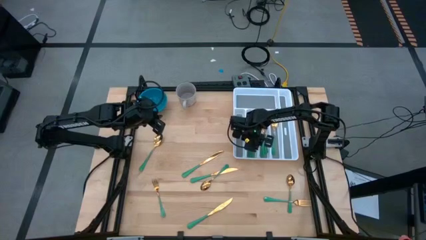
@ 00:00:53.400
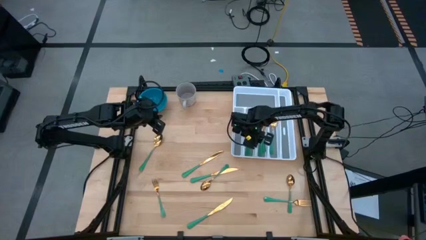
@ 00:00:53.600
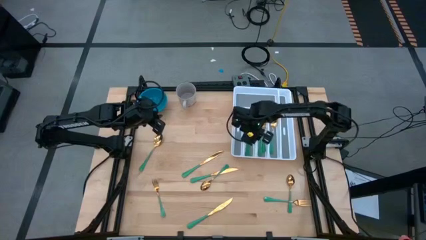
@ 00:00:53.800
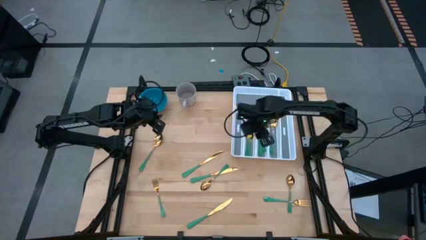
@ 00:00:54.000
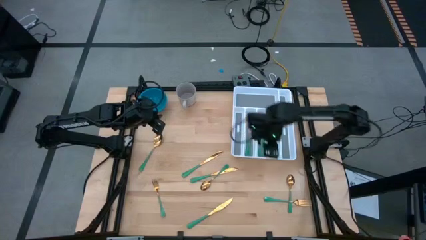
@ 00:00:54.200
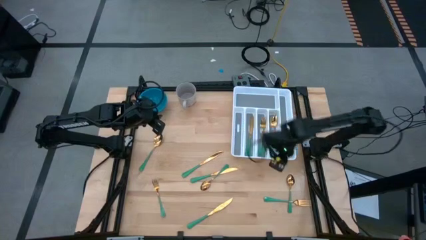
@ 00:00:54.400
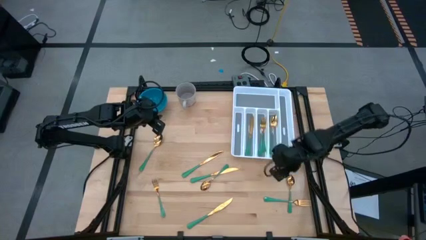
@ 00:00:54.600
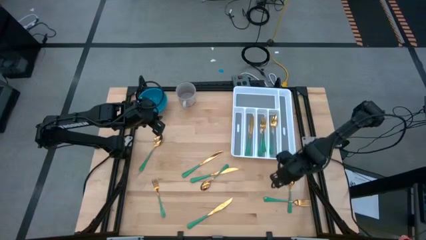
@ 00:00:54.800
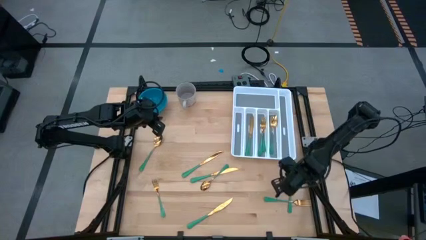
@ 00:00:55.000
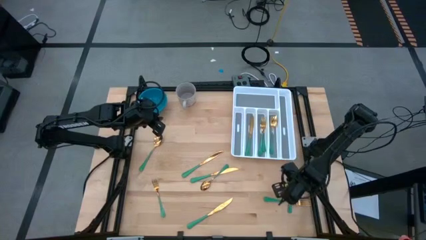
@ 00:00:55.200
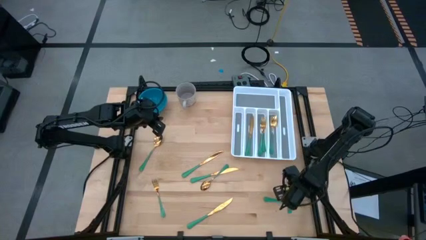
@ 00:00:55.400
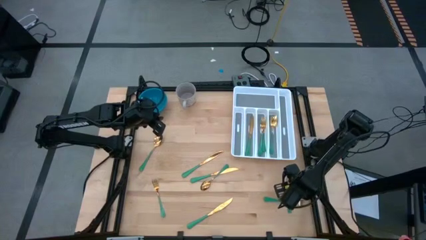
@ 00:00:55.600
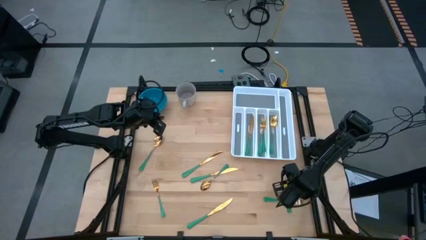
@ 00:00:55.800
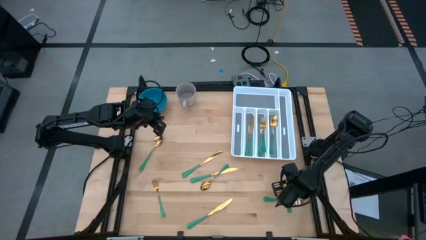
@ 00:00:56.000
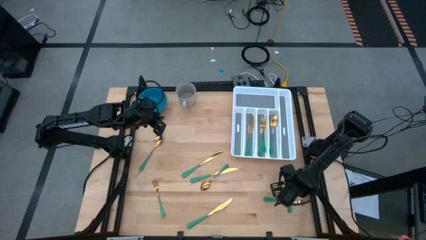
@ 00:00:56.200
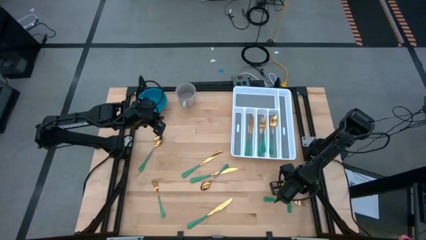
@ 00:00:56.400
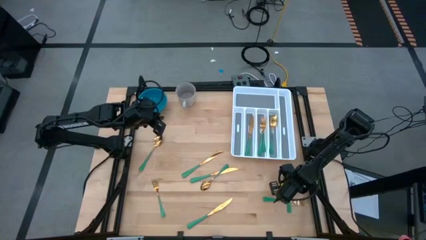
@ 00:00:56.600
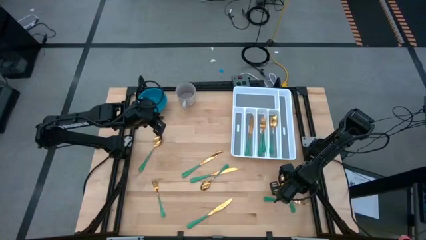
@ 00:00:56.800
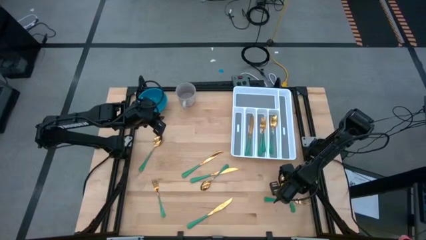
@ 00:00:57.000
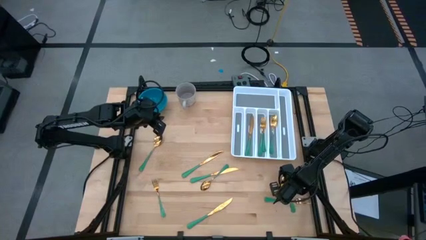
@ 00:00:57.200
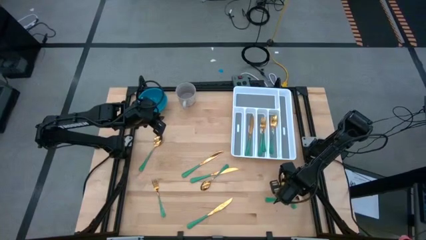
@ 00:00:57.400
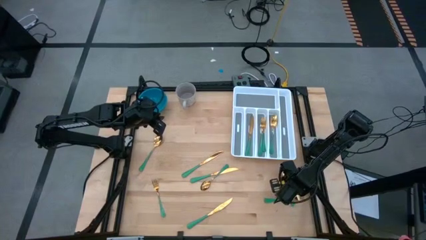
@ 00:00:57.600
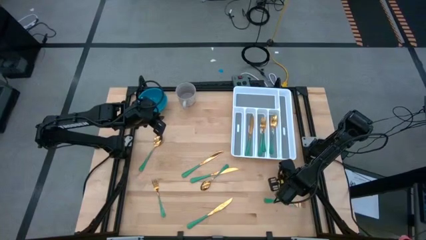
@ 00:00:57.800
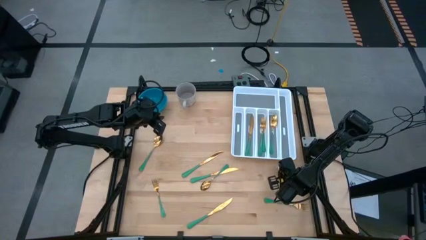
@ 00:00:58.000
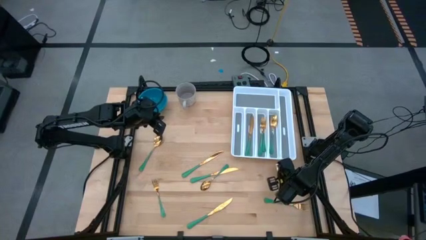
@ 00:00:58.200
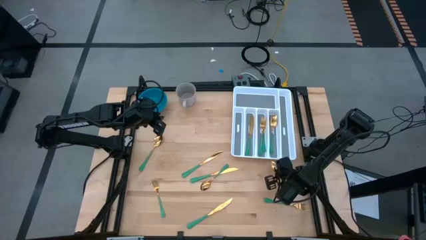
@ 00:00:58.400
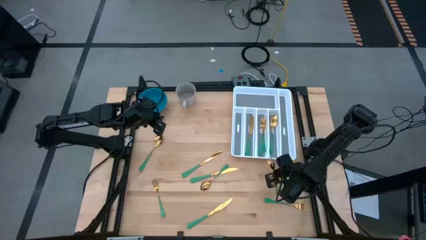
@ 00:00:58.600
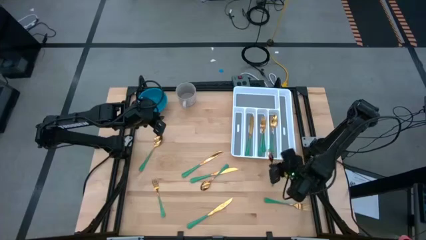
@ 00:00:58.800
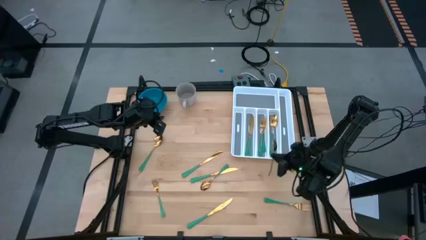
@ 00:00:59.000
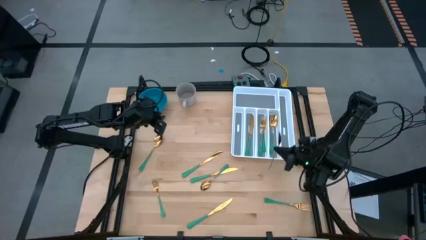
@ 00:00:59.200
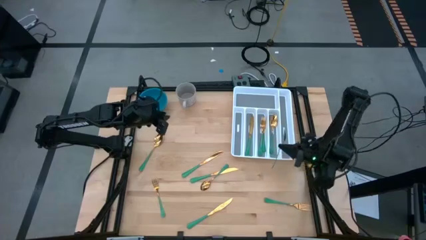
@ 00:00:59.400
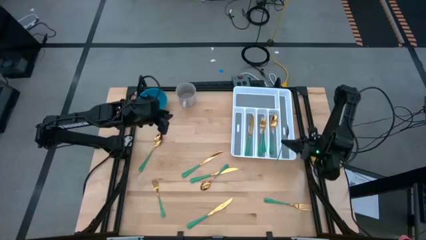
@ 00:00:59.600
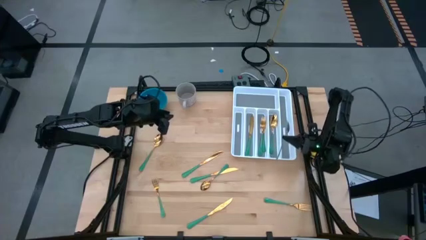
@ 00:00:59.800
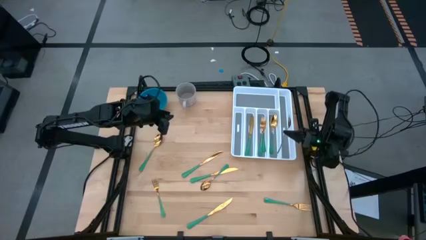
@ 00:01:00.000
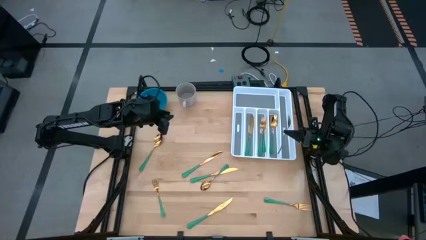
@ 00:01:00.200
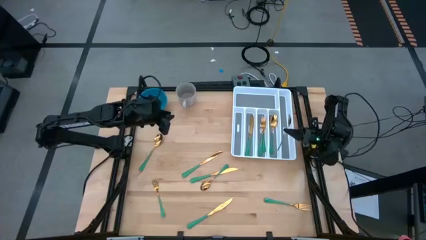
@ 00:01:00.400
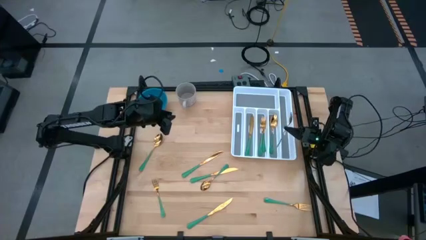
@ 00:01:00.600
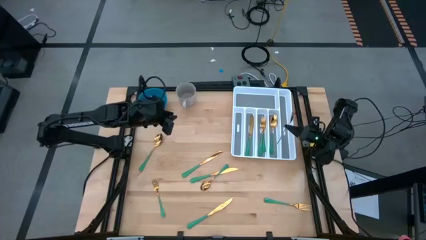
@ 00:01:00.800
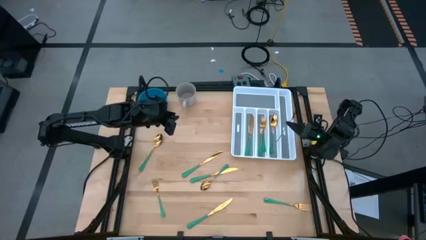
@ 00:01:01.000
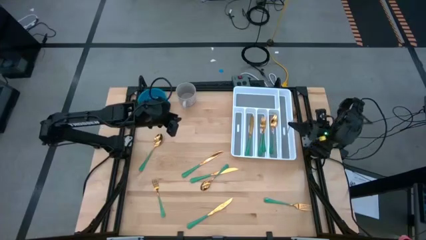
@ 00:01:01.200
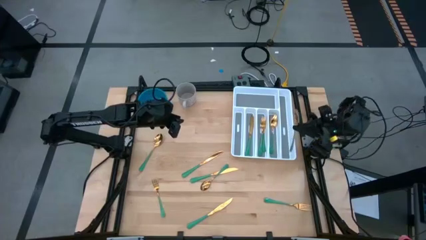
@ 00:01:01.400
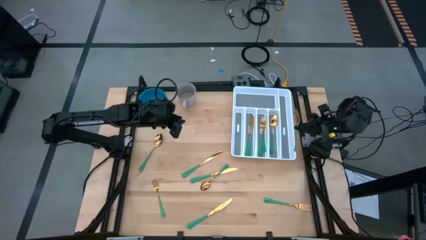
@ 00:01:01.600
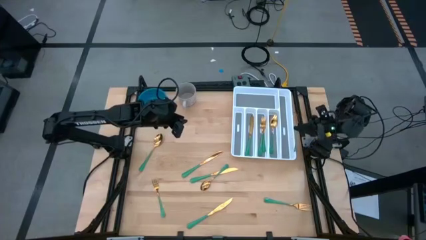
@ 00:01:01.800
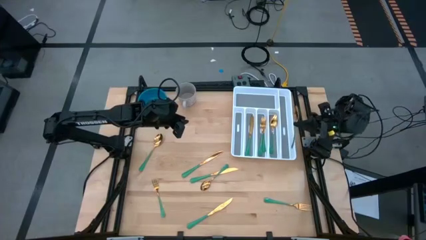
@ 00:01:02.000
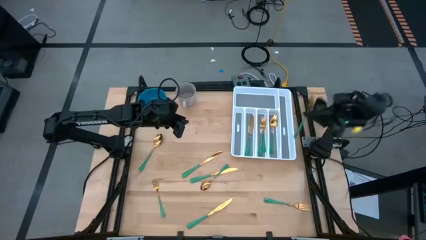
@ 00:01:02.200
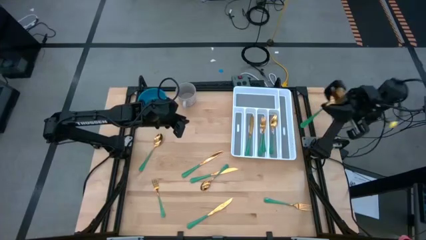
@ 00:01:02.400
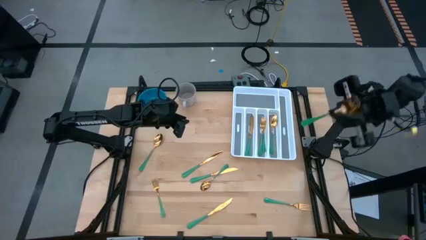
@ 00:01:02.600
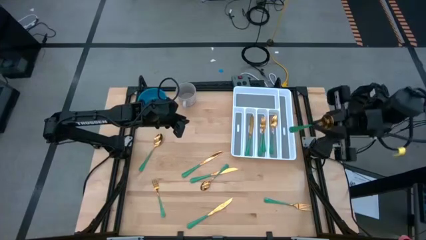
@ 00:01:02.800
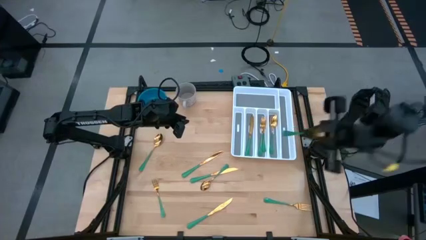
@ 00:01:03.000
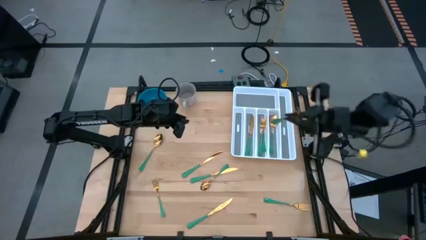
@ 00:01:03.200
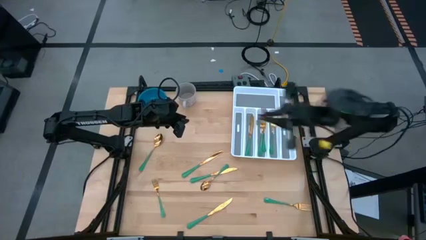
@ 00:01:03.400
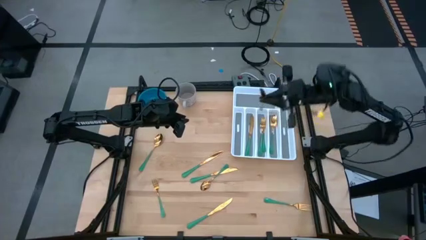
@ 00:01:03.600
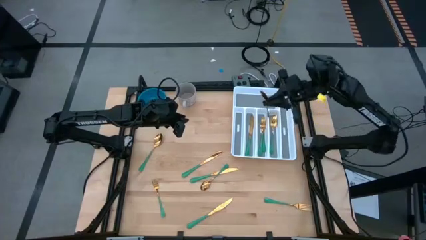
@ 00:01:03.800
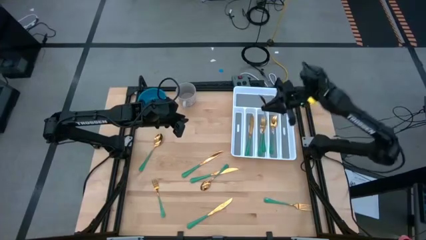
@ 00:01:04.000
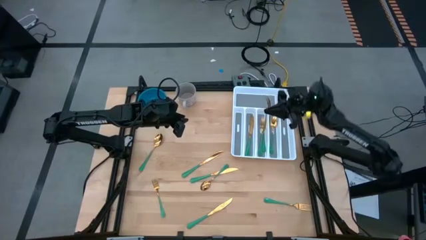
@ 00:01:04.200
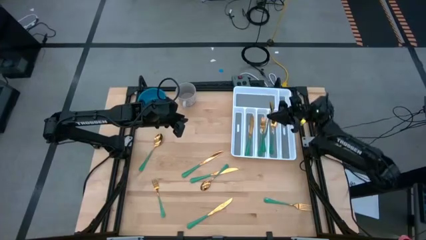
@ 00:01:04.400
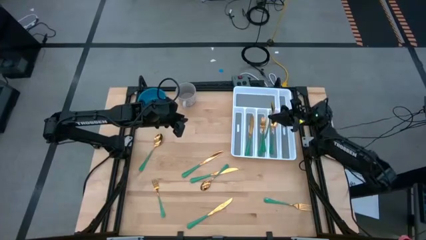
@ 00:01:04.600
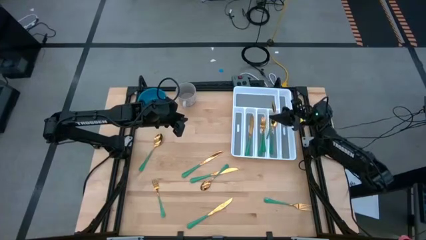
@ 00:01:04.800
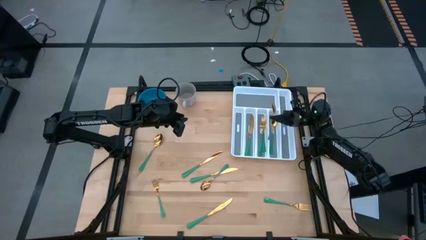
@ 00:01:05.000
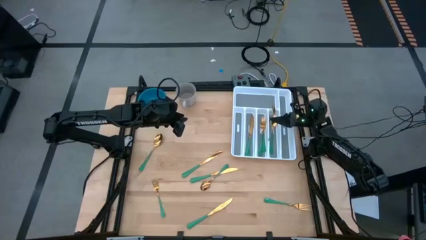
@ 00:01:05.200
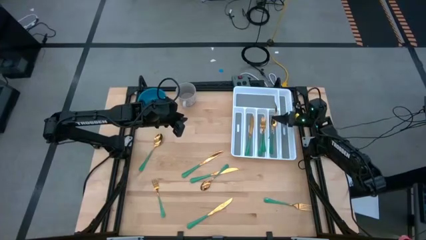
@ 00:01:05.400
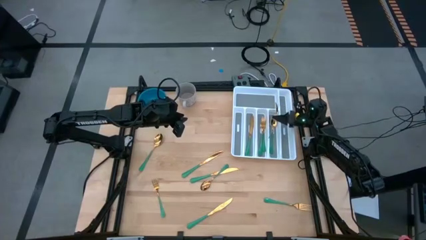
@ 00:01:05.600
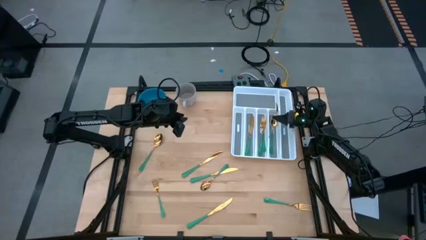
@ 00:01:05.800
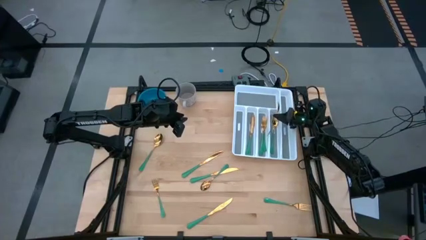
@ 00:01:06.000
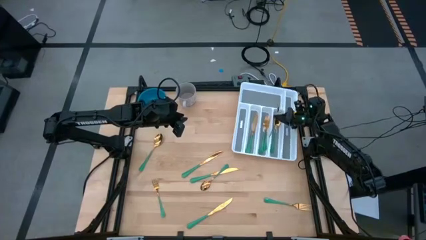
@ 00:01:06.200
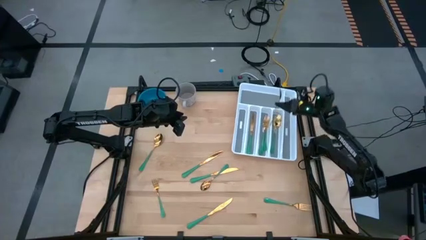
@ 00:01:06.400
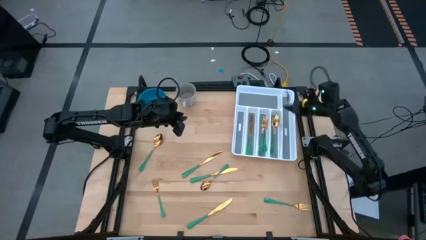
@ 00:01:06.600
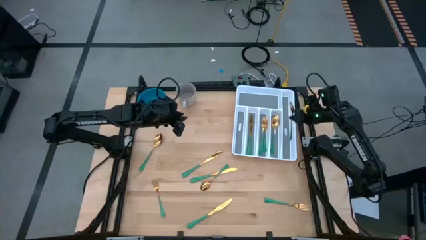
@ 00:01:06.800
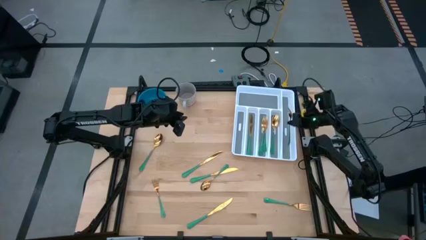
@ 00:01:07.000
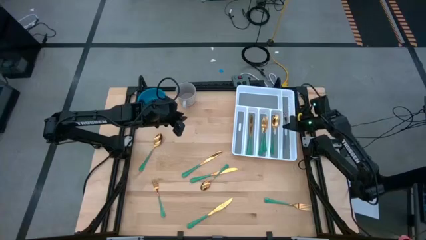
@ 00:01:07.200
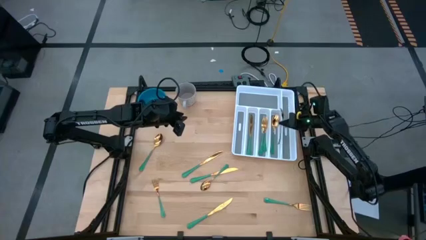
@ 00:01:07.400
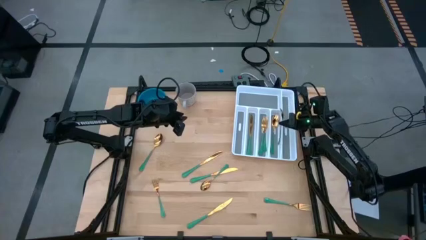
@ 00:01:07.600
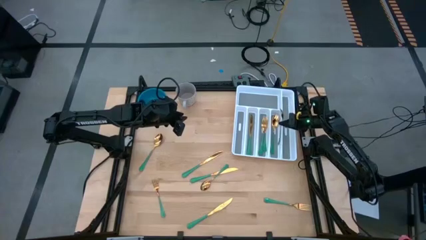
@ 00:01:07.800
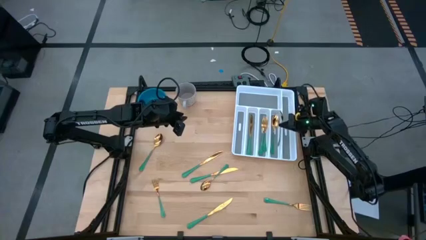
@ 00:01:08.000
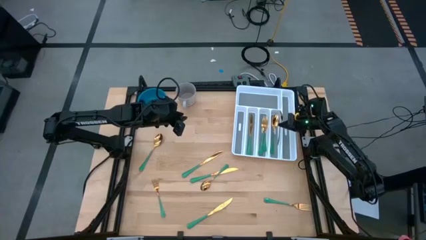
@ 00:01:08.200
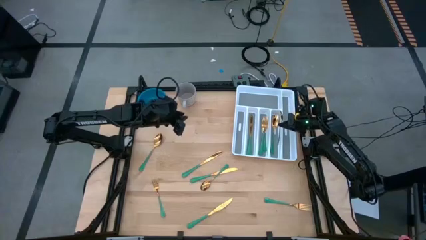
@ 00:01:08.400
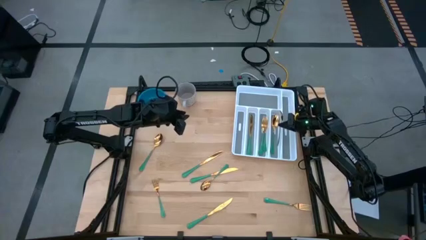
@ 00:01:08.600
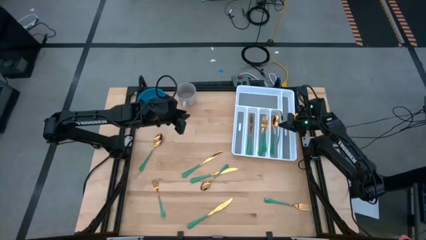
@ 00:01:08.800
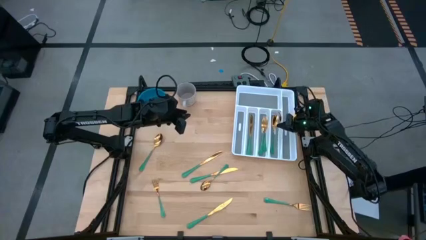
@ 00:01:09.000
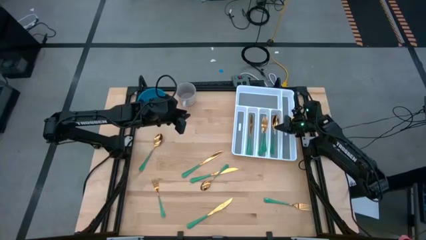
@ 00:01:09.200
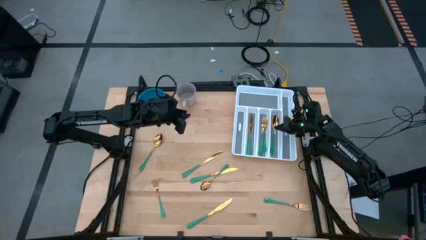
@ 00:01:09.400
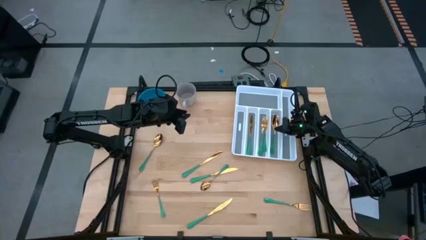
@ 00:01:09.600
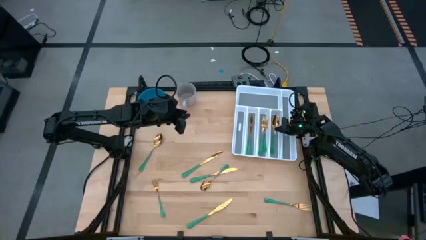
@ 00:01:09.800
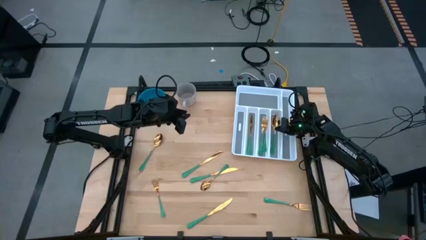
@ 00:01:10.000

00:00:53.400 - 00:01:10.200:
Task: Sort silverware
Put the green spoon into the white cutlery tray
